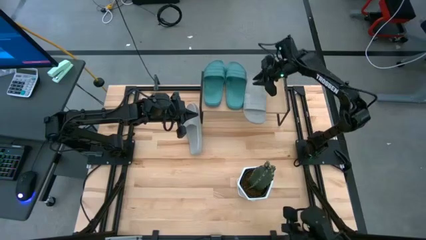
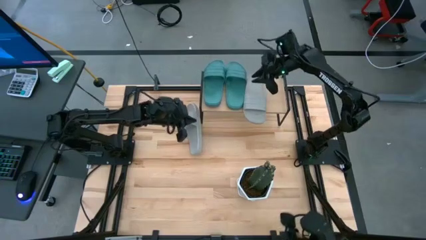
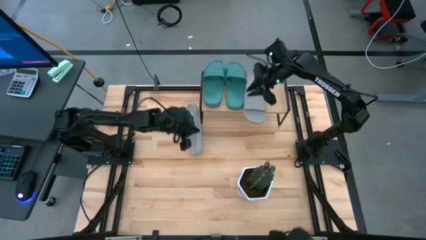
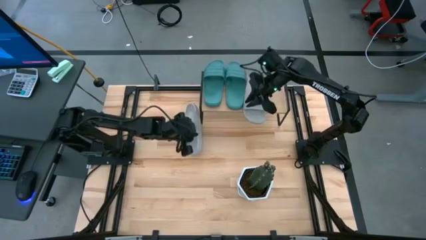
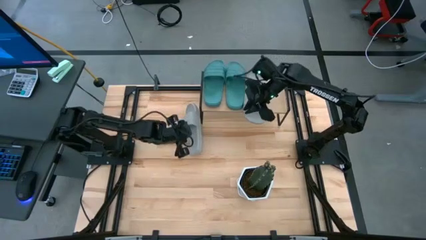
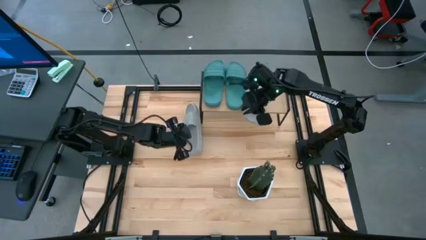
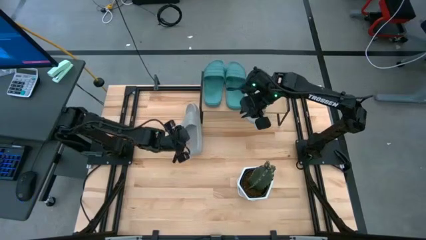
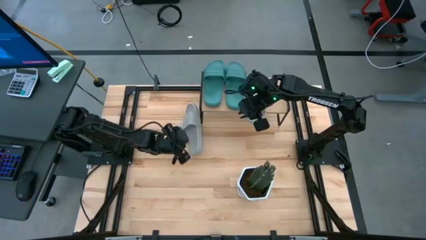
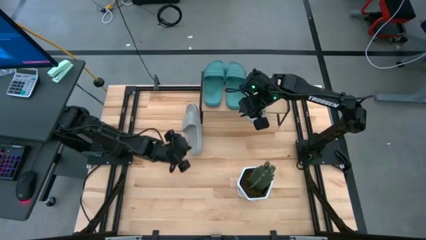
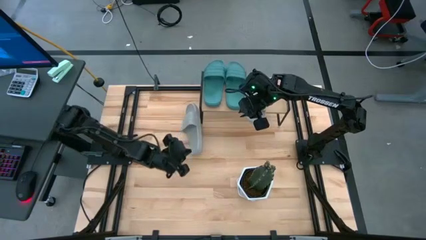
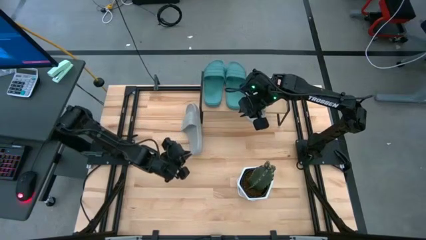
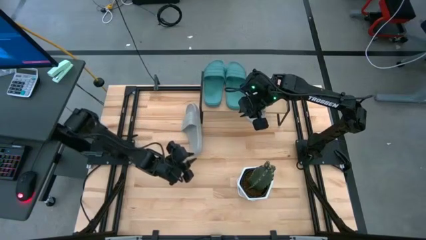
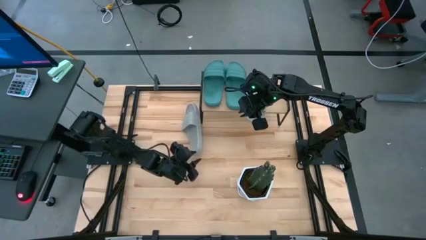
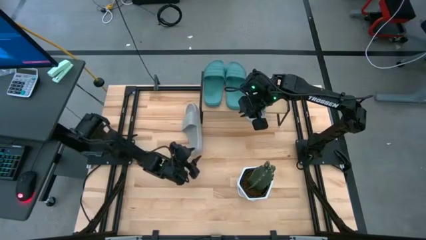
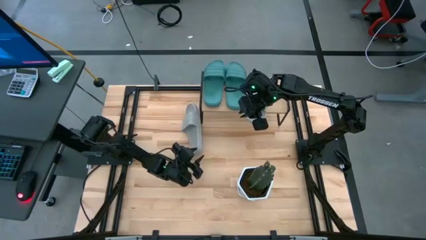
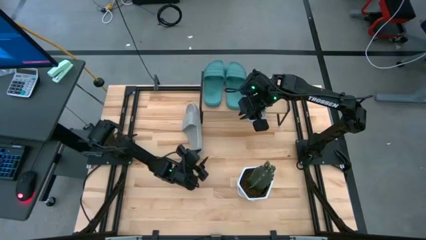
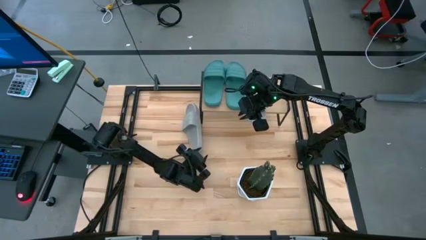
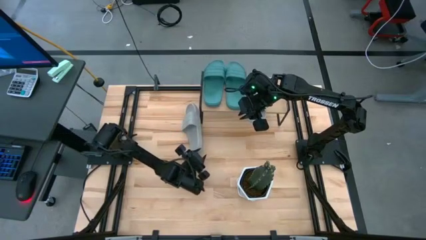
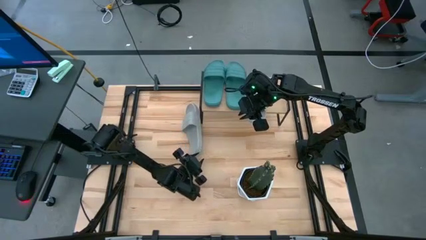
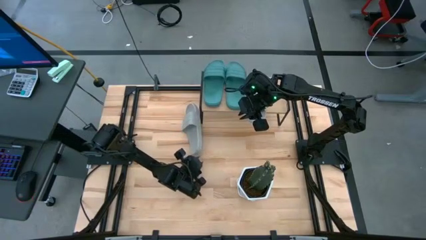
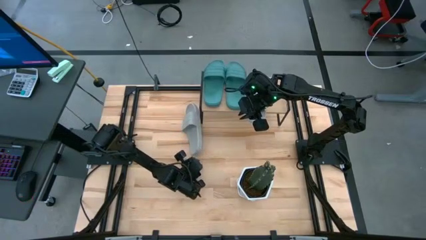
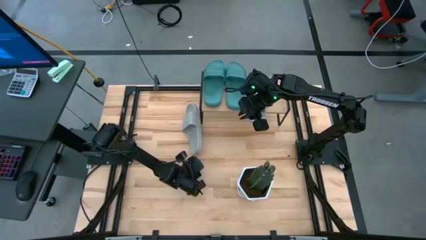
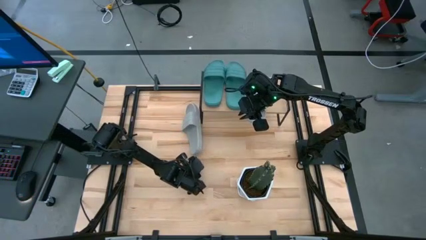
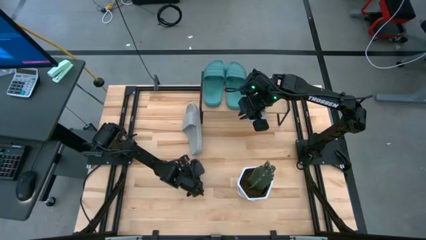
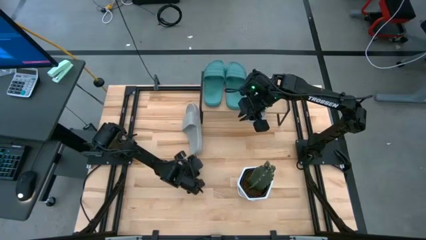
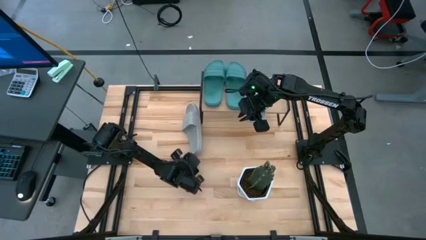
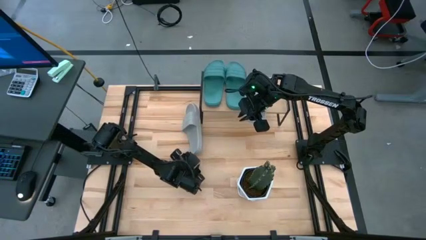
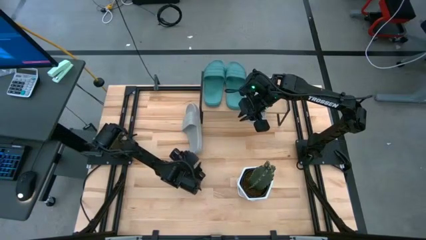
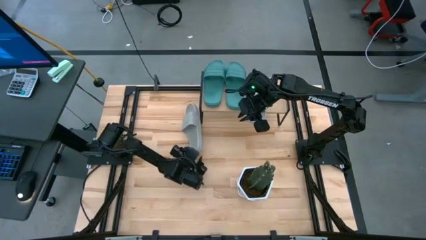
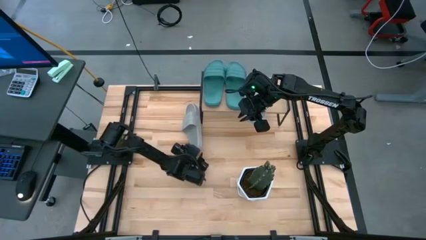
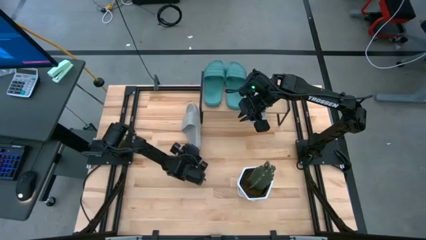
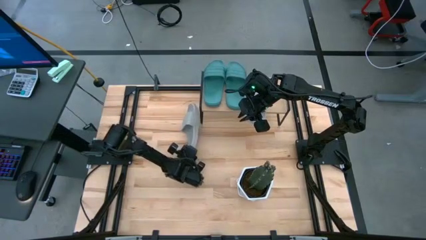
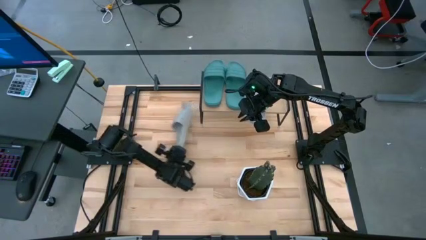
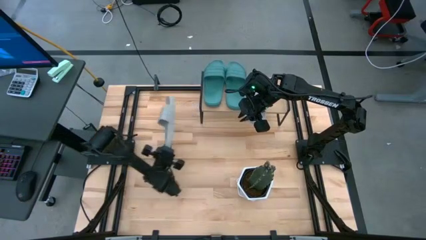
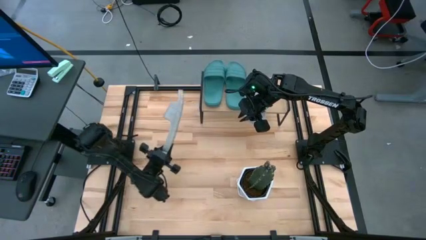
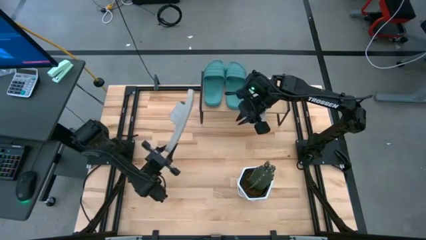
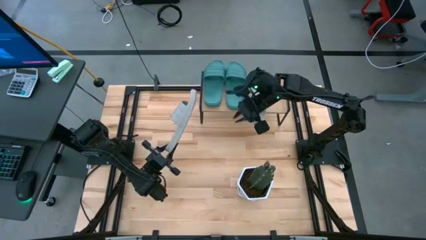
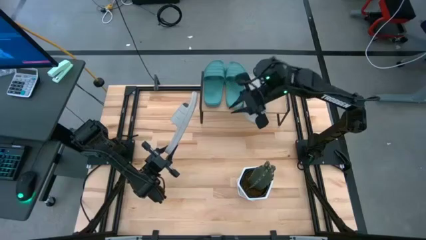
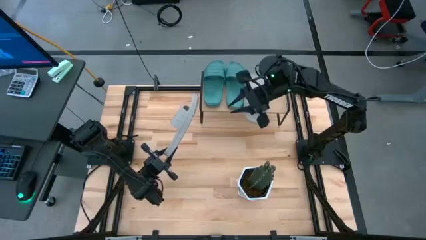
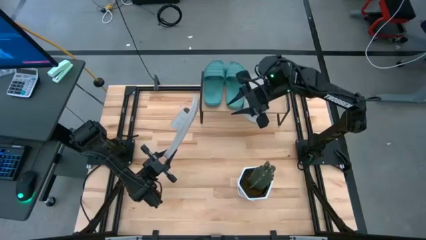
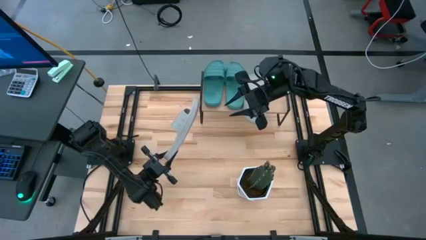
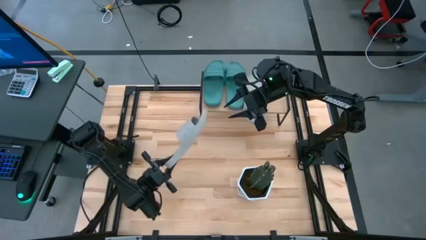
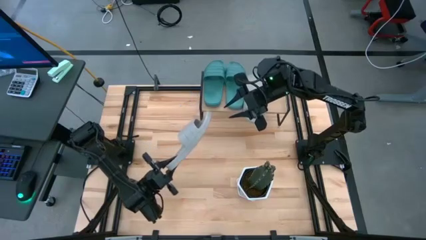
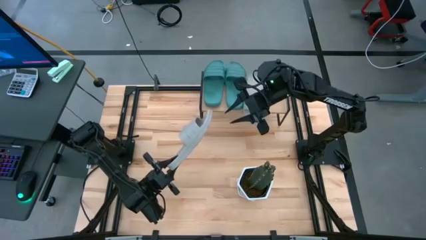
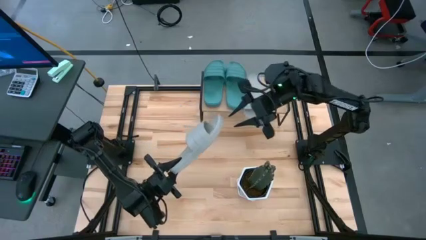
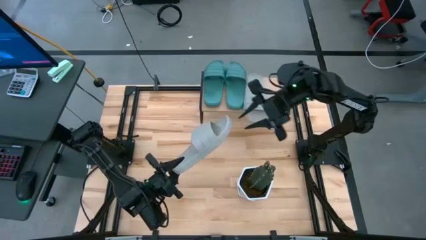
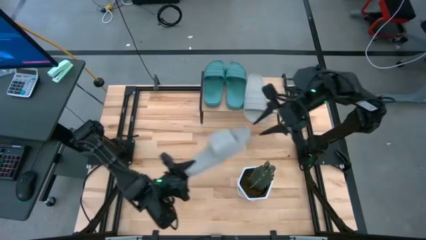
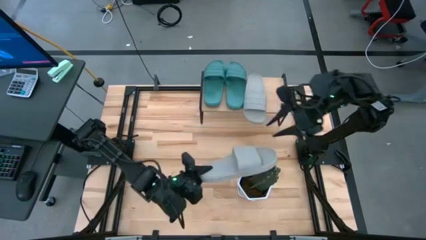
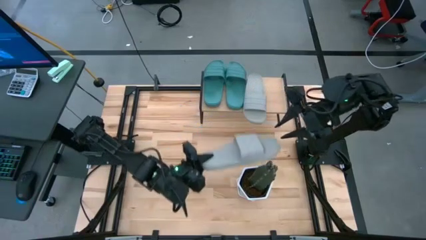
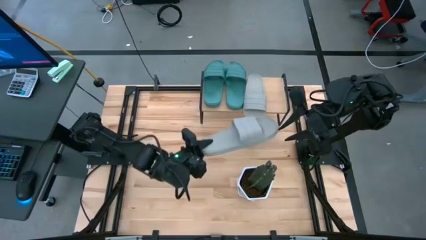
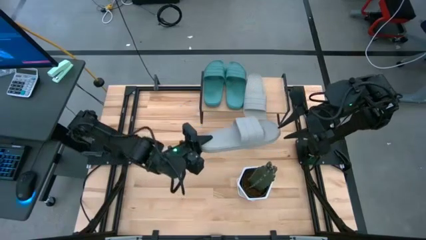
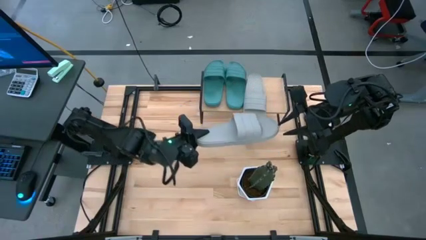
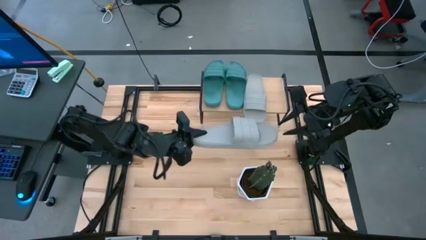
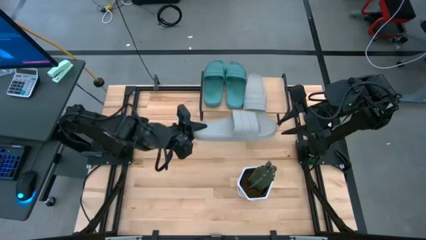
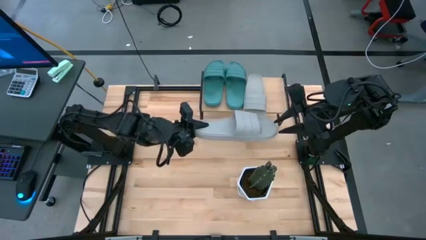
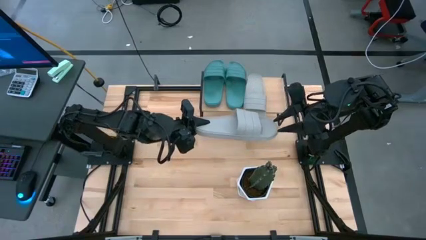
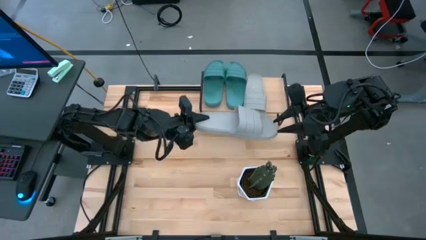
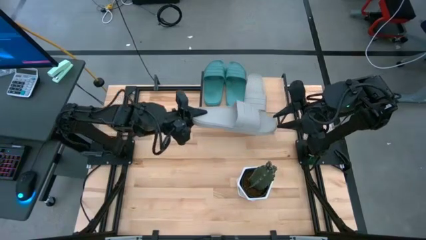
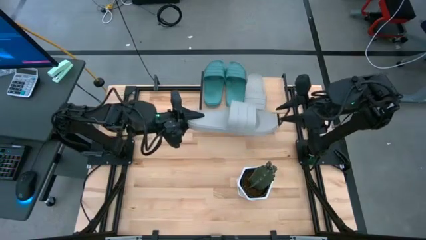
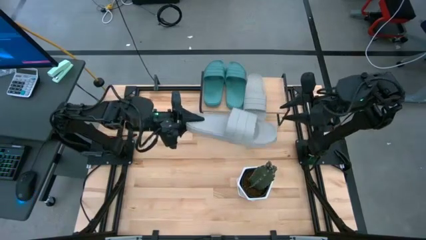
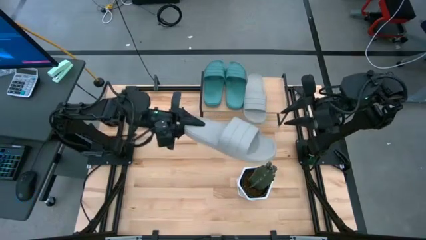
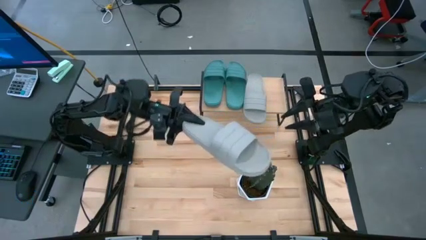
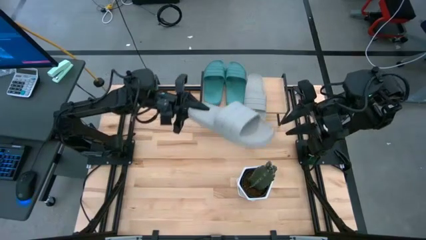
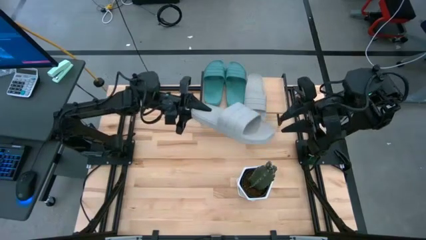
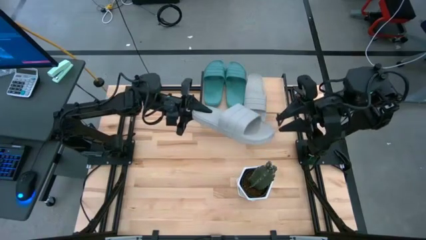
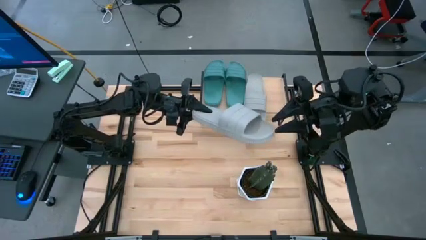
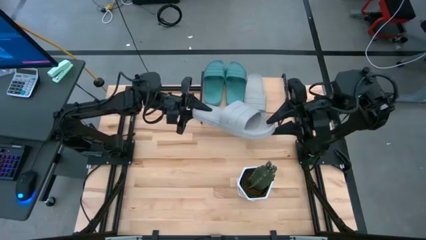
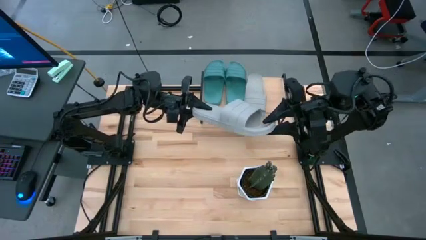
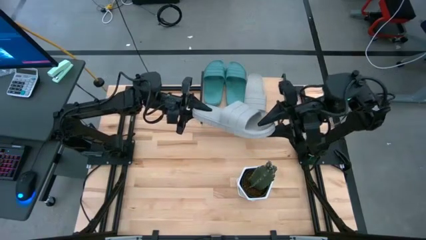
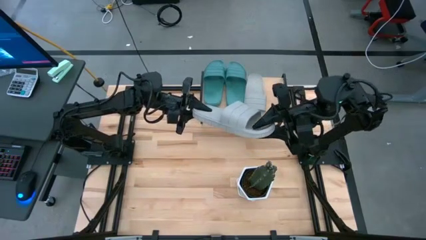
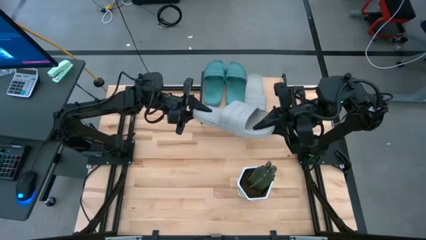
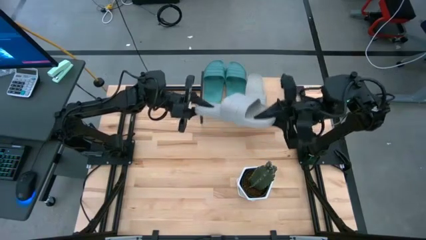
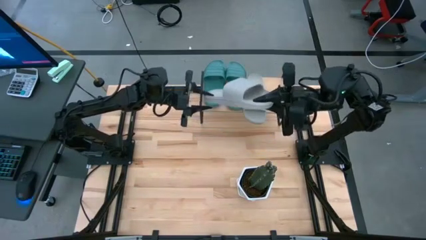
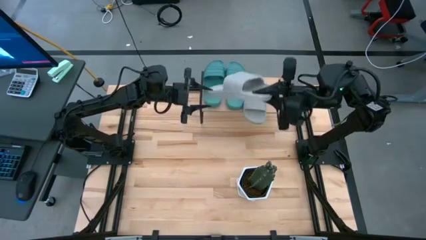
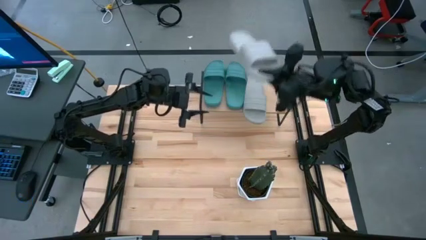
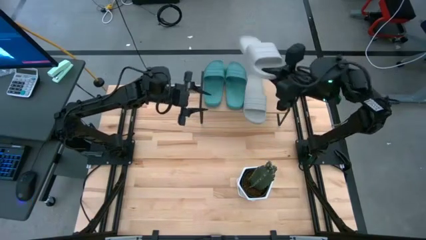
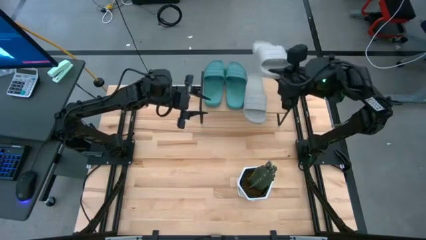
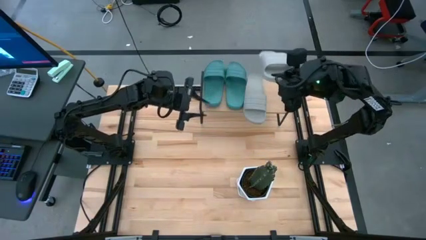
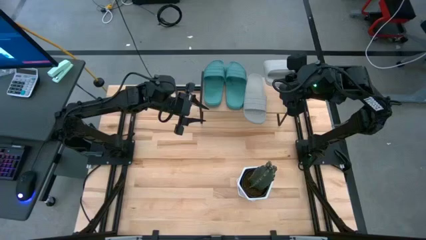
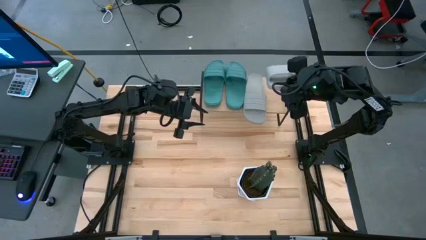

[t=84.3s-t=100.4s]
Task: Pick and place slides into the shelf
Put the gray slides on the shelf
